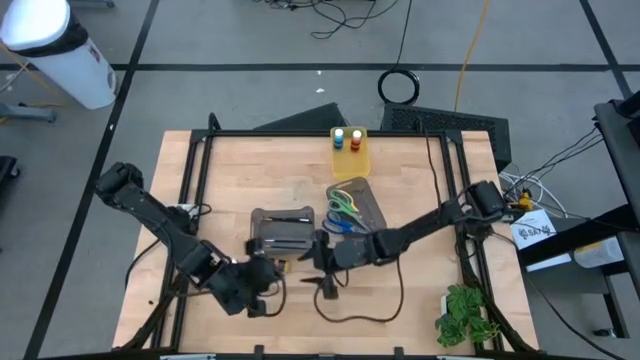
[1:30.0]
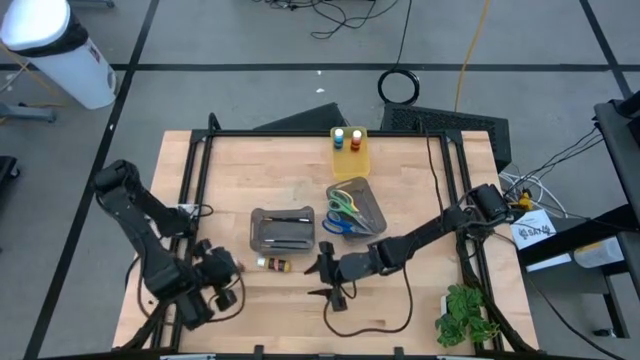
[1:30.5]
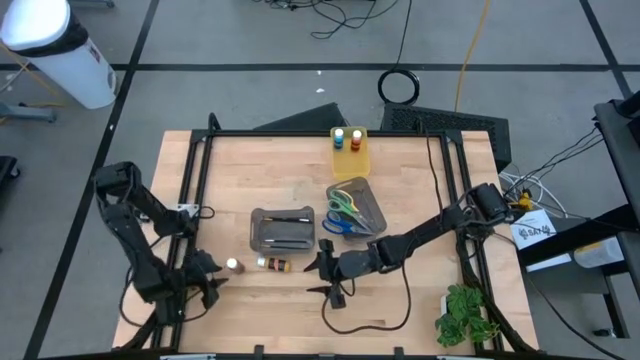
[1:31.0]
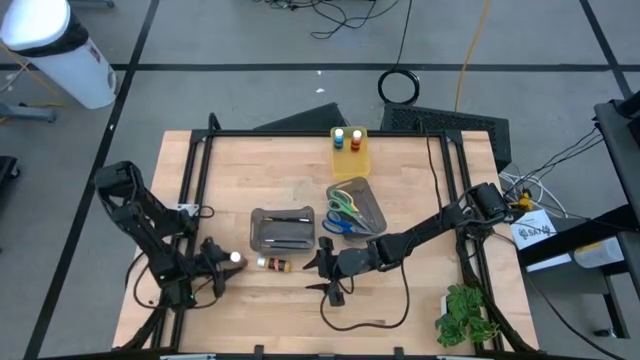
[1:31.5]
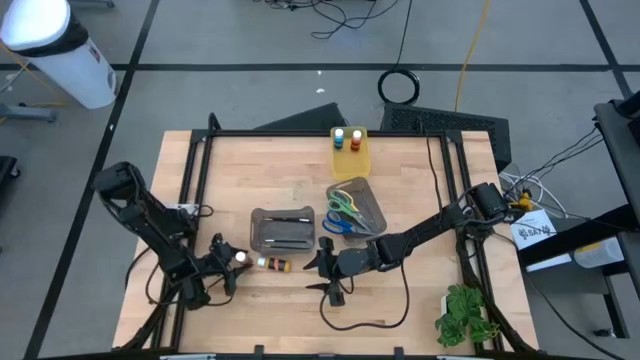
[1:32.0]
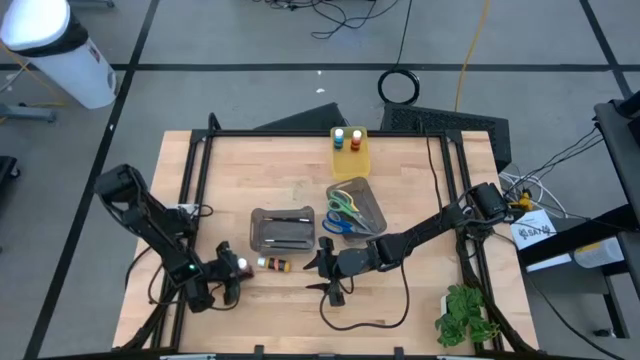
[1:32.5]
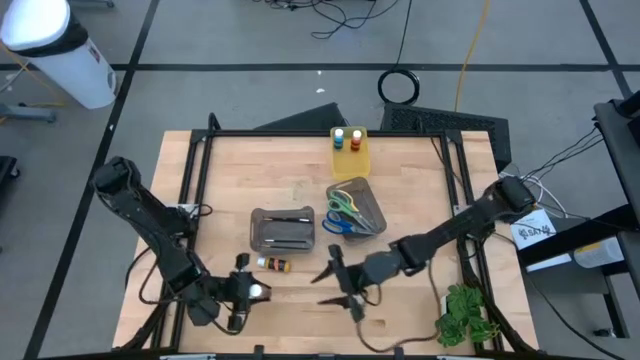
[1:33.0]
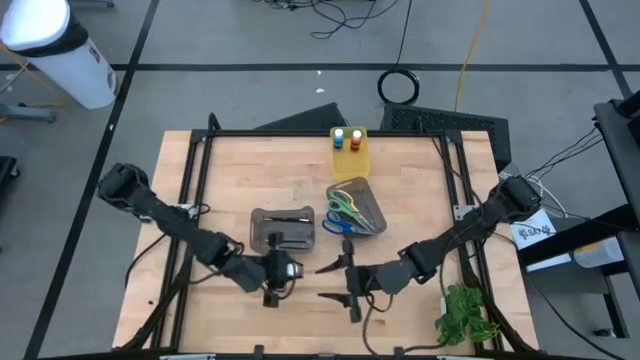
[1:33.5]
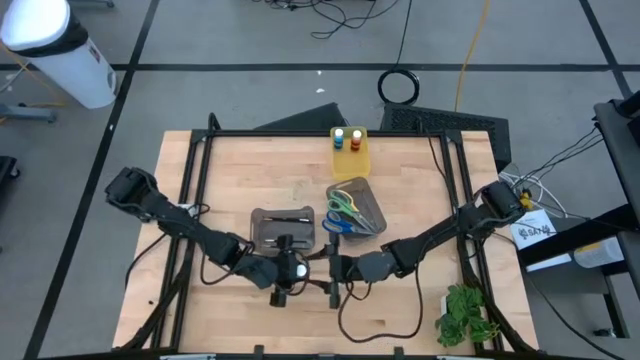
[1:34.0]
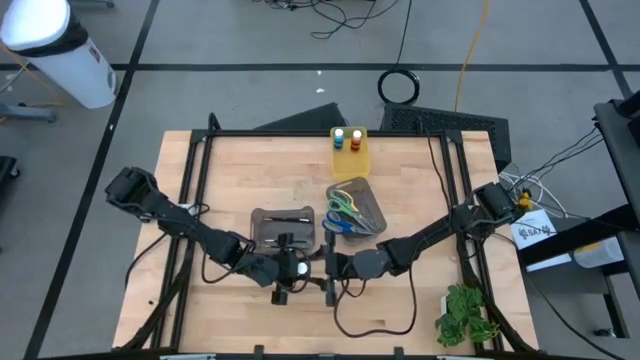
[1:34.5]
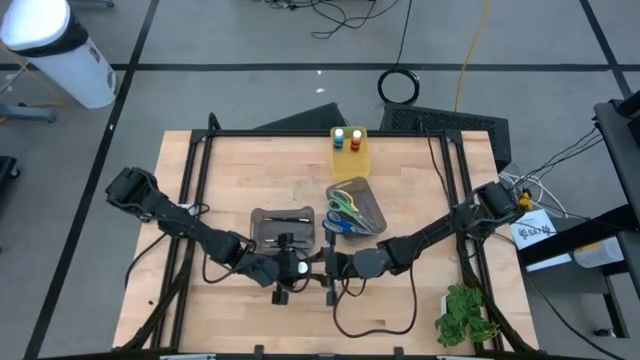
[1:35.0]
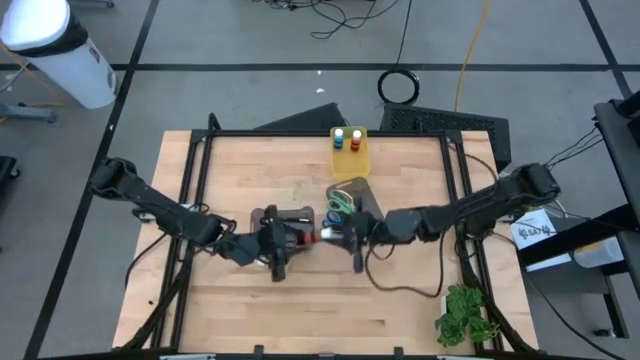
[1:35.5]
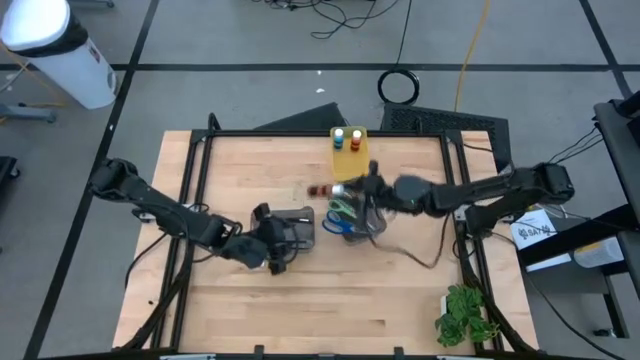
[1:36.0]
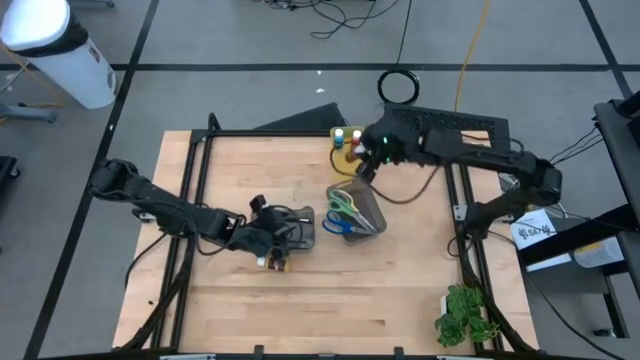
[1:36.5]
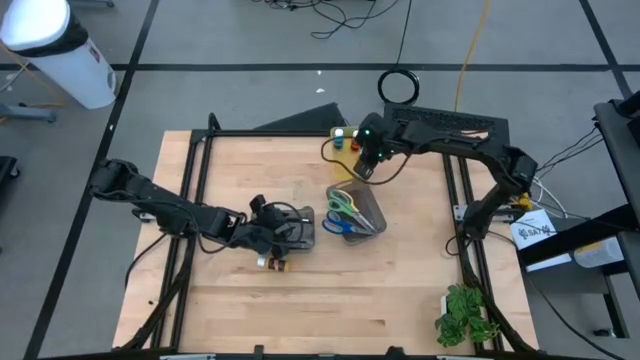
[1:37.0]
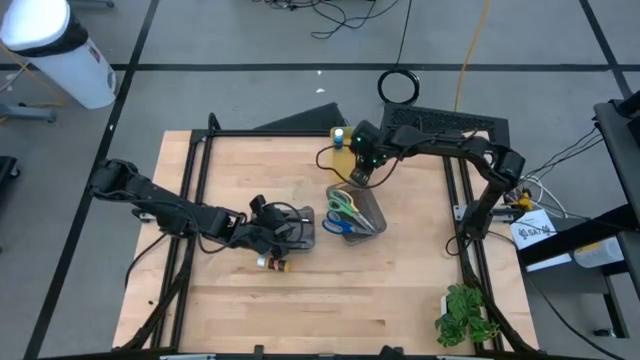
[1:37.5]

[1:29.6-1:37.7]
Task: Pick & Place Paint Supplies
Put the brown paint bottle into the yellow bin

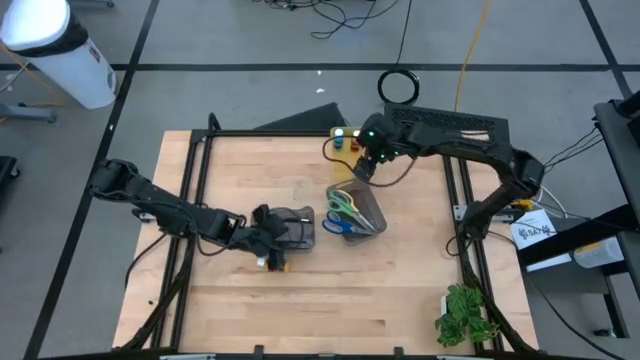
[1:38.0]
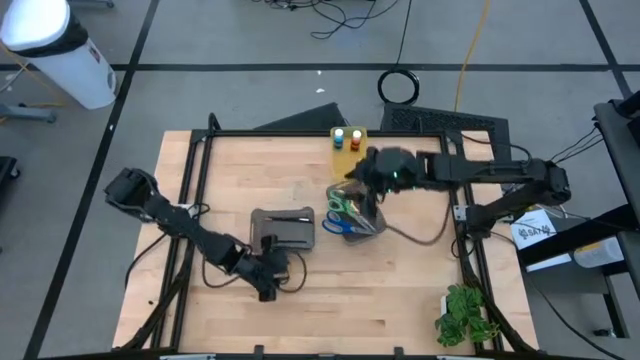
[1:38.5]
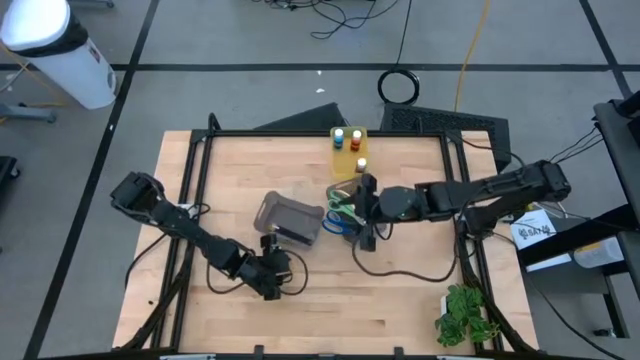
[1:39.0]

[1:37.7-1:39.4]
Put the yellow paint bottle into the yellow bin

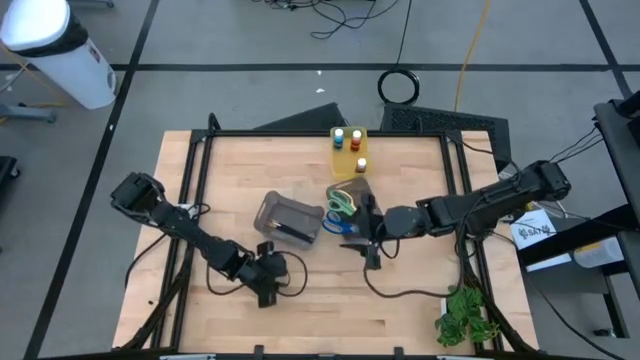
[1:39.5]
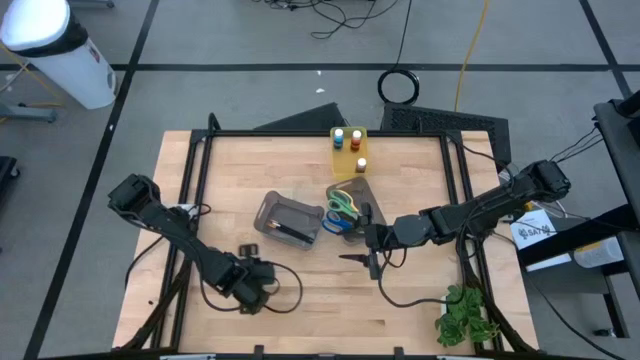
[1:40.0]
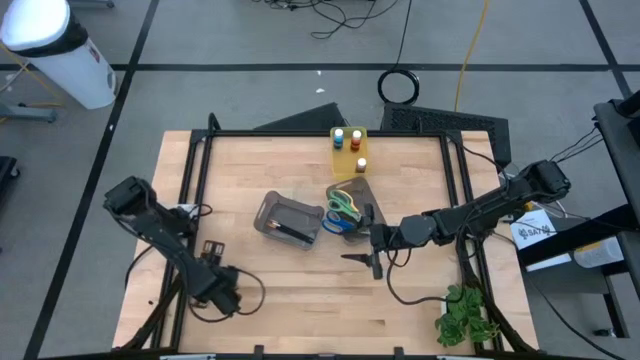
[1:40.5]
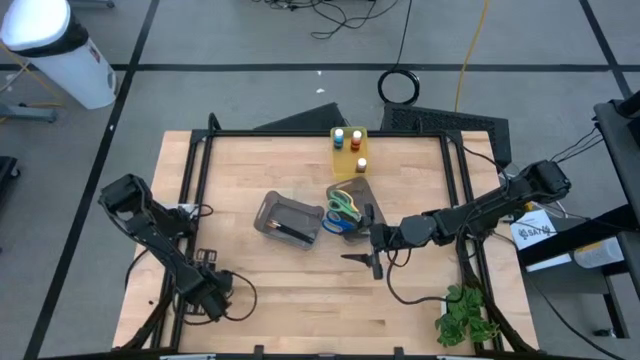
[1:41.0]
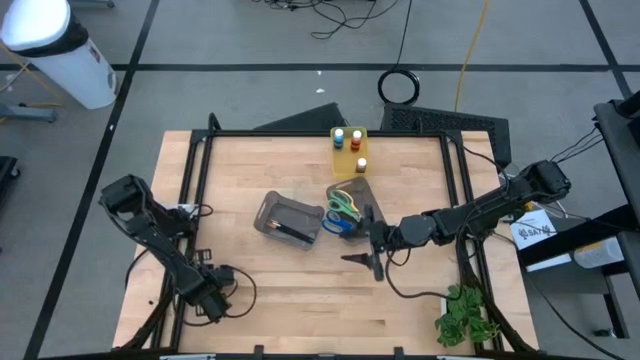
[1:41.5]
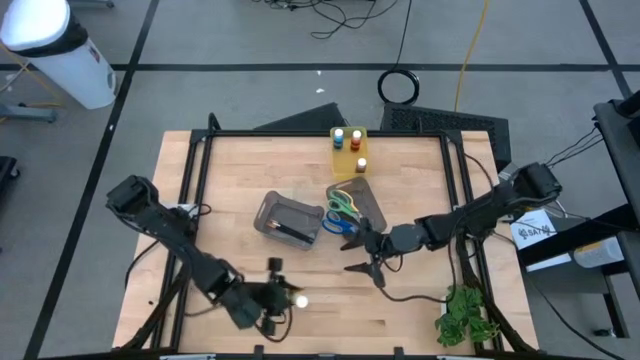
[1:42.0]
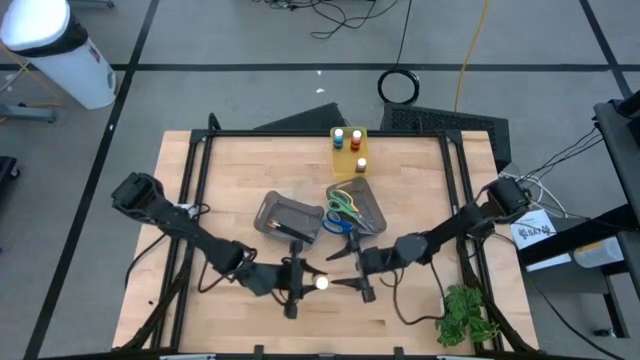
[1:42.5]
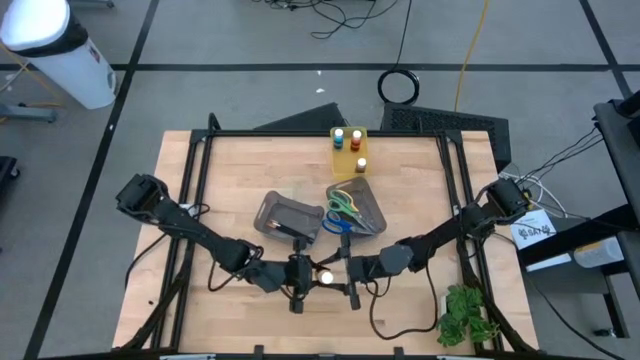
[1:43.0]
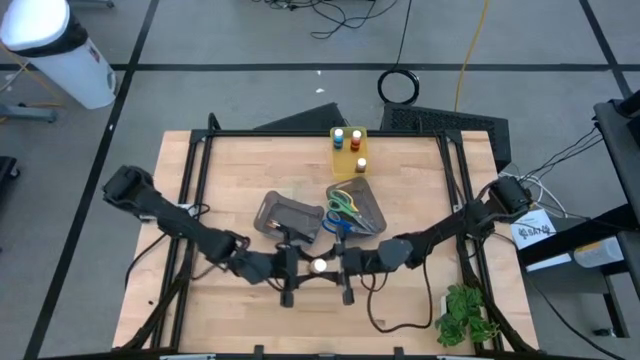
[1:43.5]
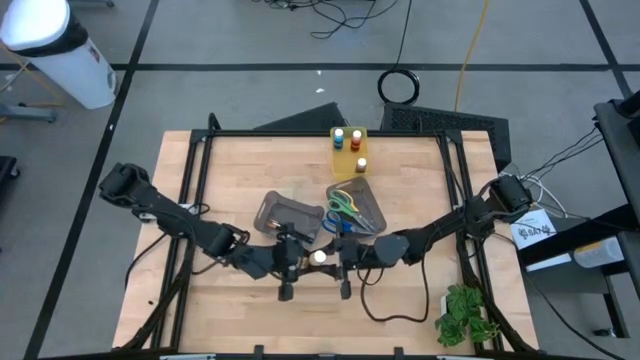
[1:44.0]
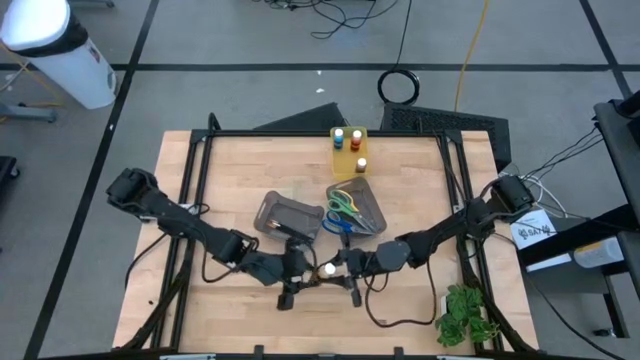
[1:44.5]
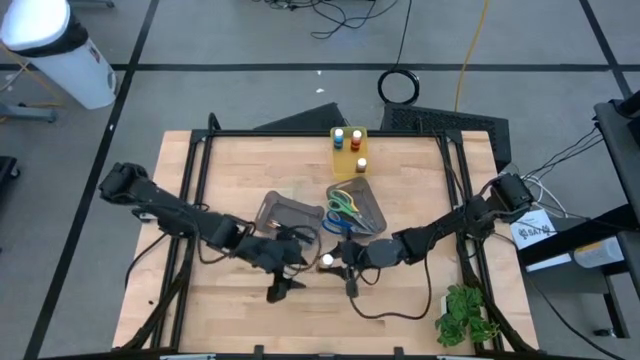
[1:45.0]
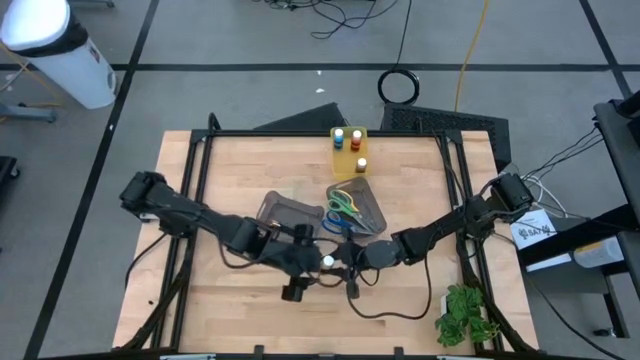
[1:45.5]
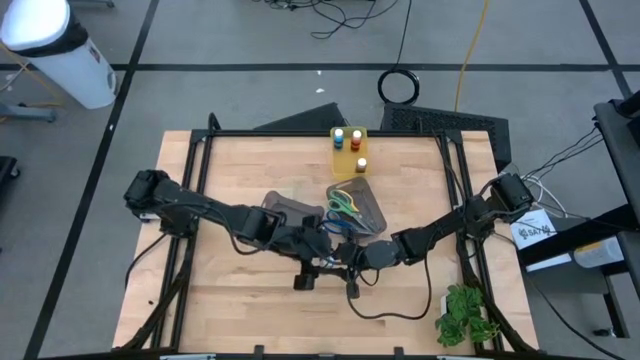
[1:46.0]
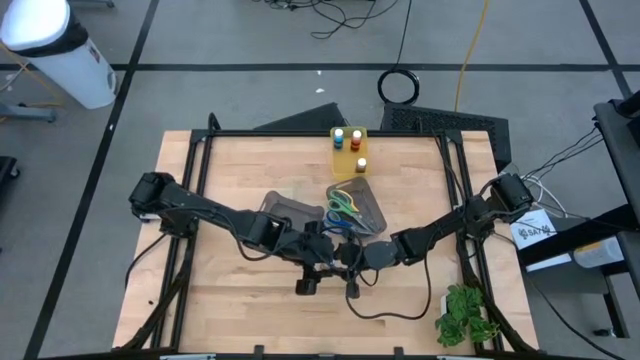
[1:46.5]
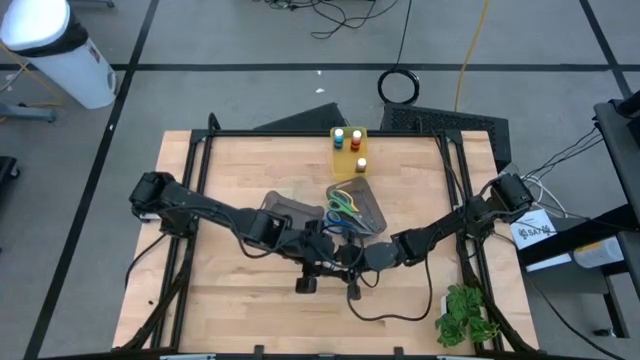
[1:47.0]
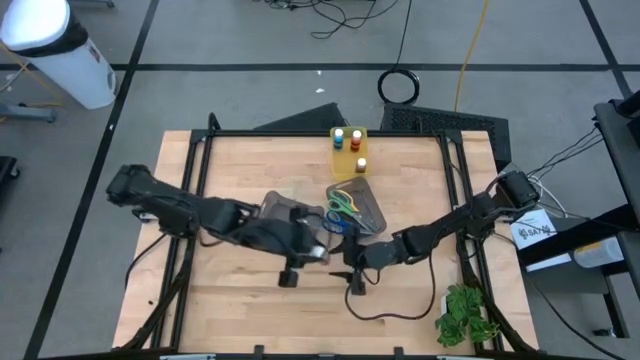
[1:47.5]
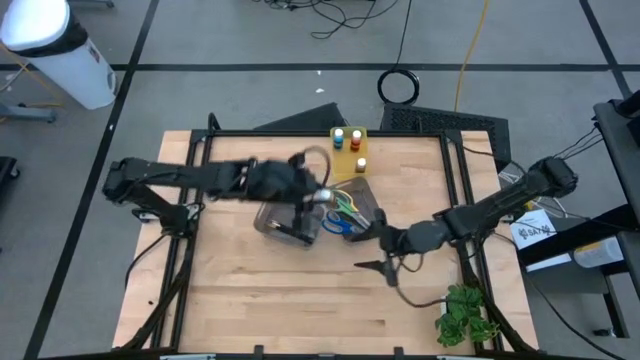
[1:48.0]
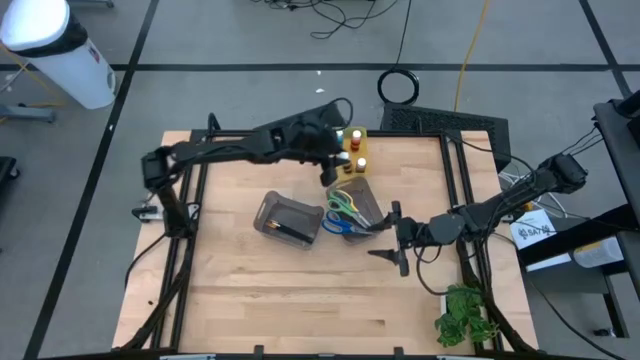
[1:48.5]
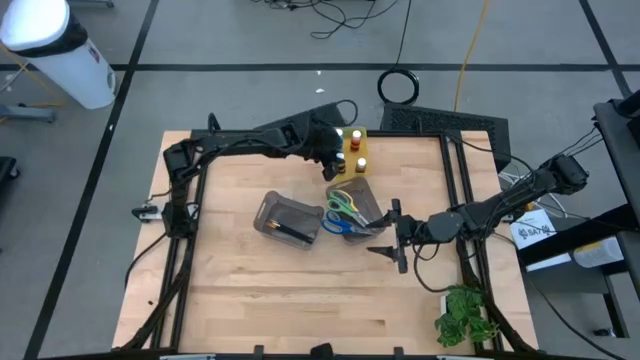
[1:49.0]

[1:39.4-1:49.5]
Put the yellow paint bottle into the yellow bin

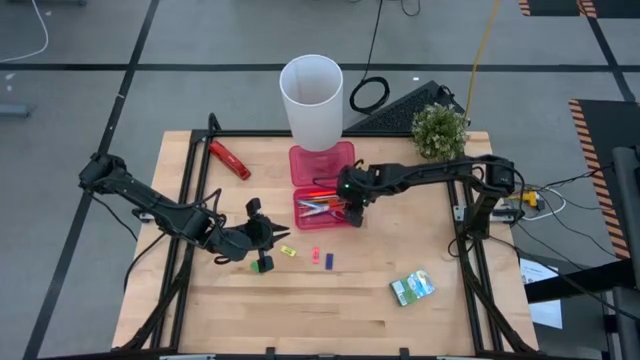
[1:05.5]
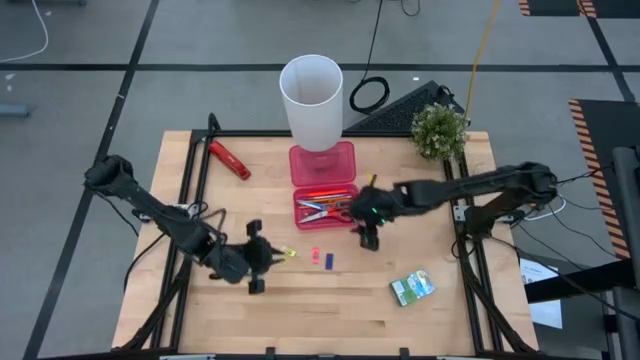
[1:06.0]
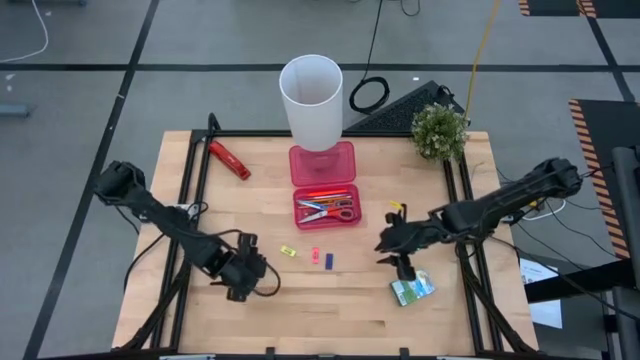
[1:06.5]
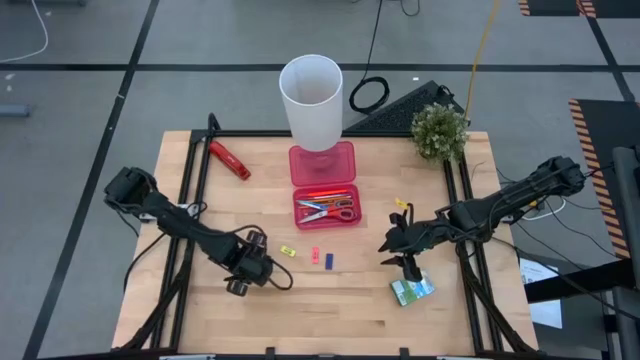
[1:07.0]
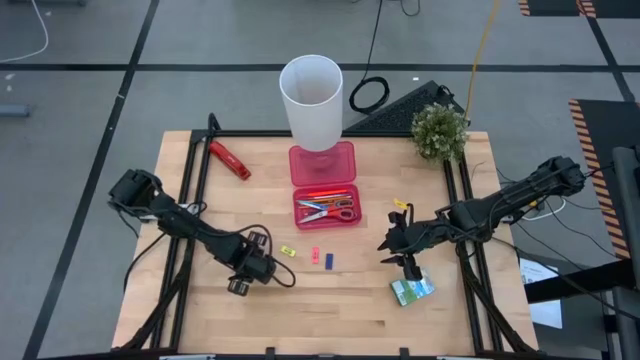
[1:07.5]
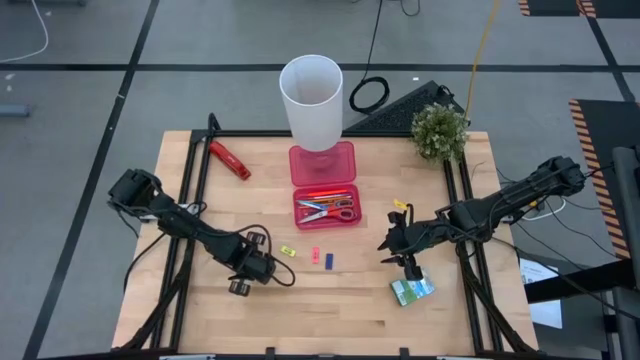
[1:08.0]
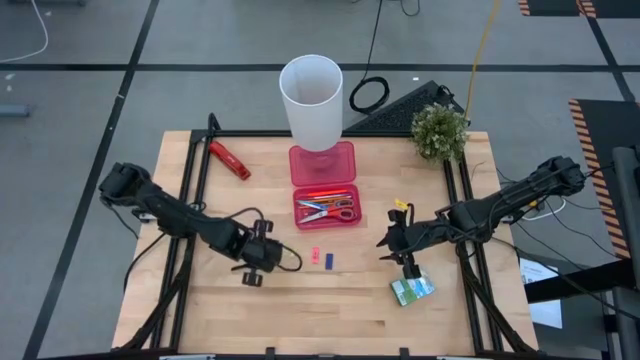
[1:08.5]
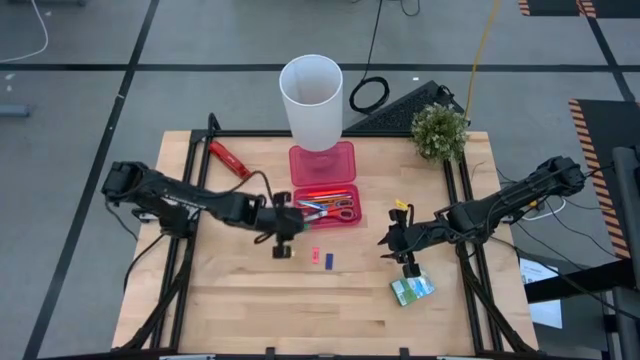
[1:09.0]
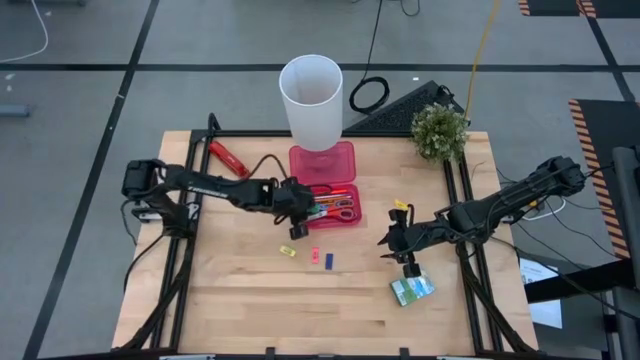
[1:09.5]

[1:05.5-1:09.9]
Task: Pack school essentials
Put the green eraser into the pink supply box
